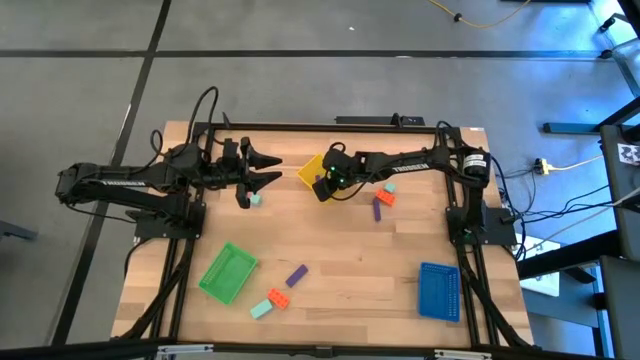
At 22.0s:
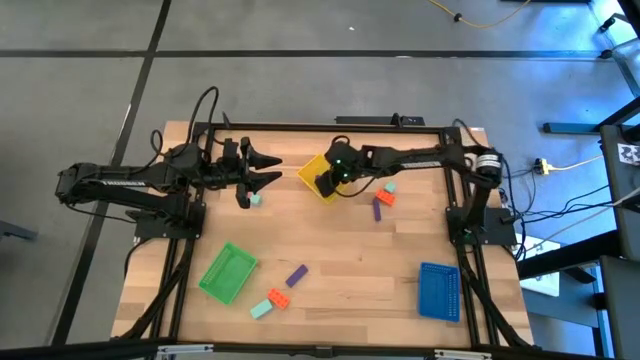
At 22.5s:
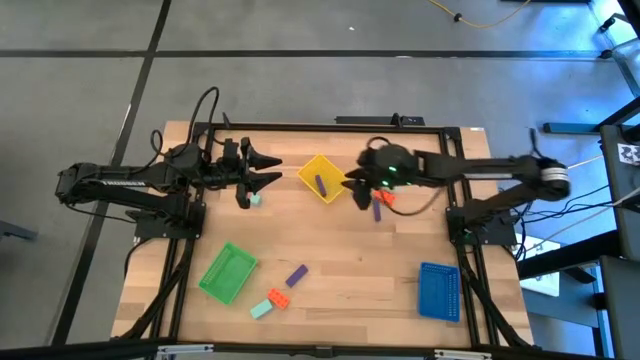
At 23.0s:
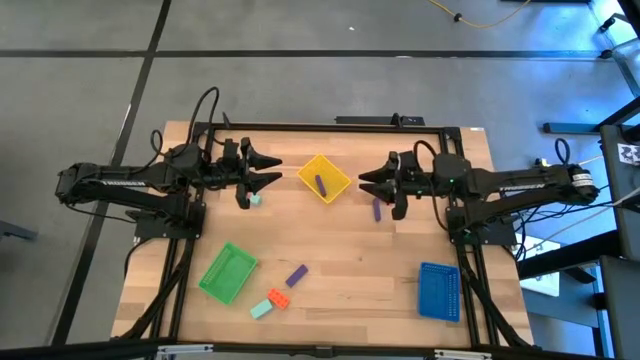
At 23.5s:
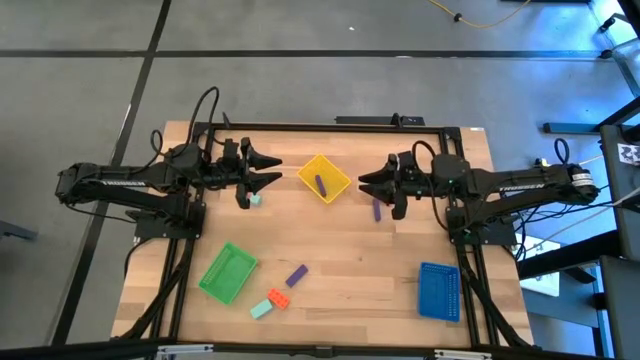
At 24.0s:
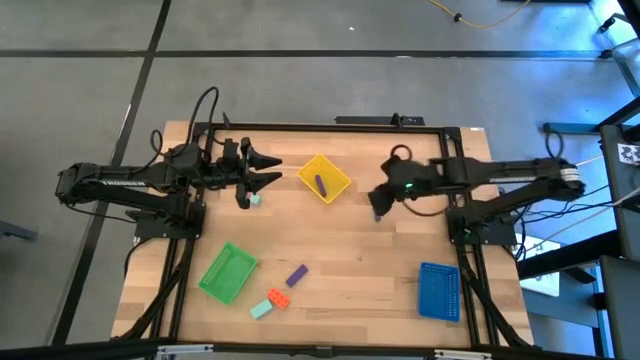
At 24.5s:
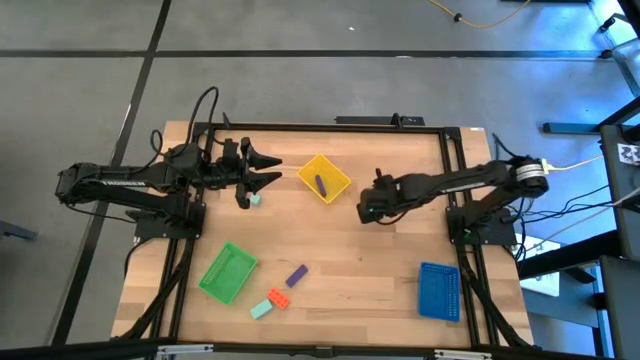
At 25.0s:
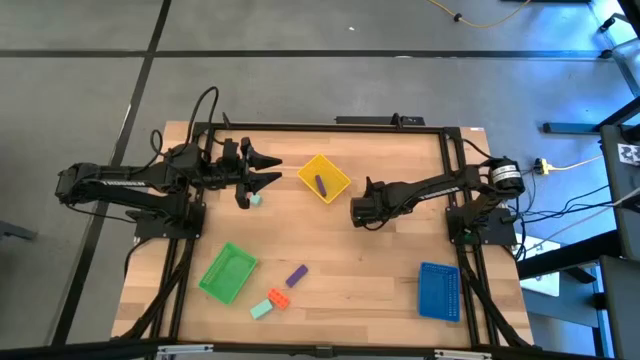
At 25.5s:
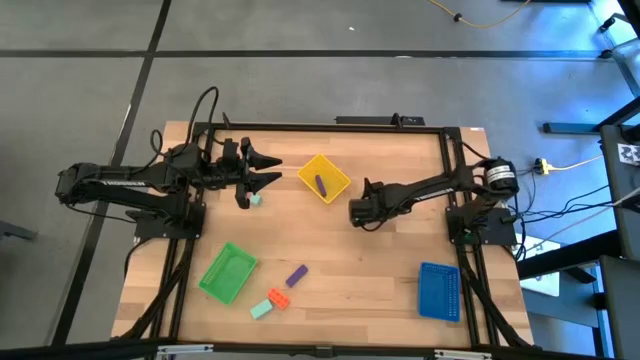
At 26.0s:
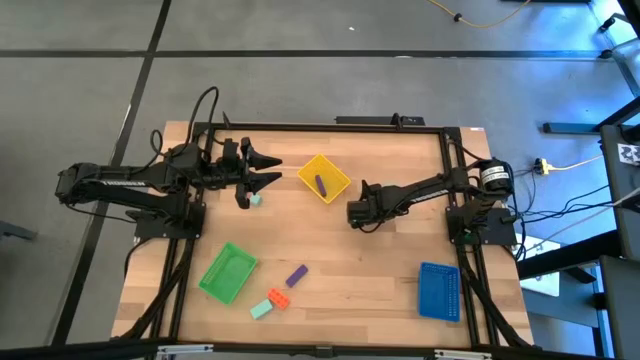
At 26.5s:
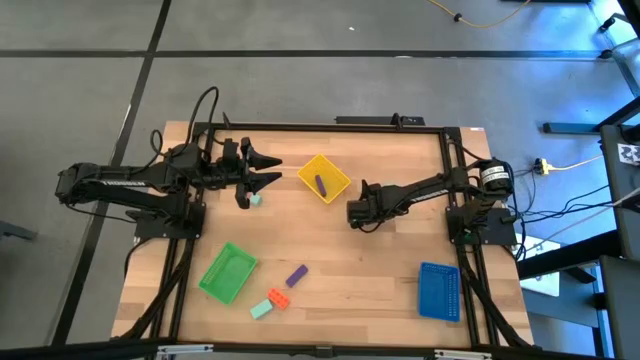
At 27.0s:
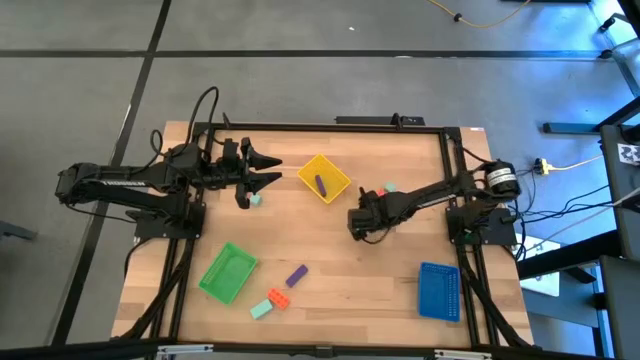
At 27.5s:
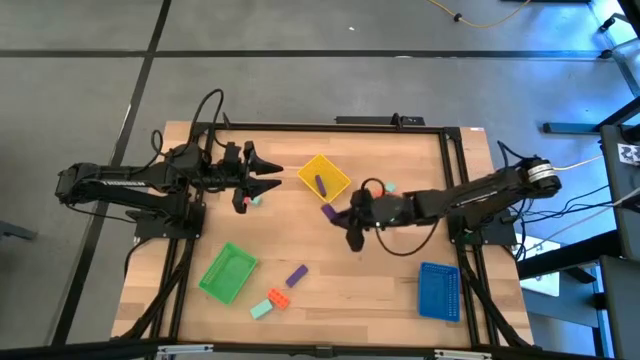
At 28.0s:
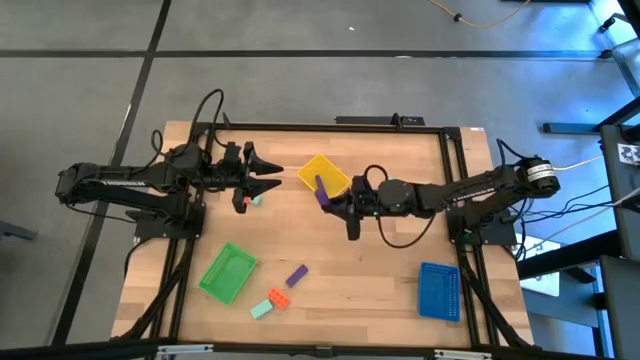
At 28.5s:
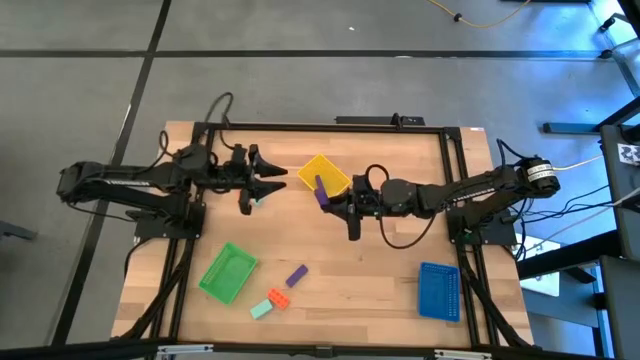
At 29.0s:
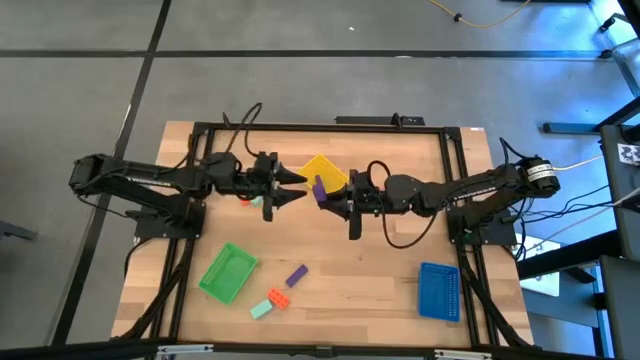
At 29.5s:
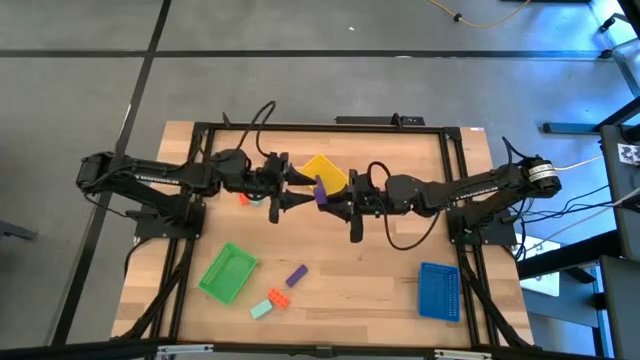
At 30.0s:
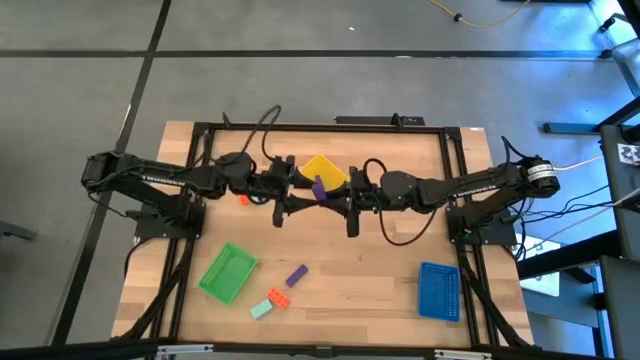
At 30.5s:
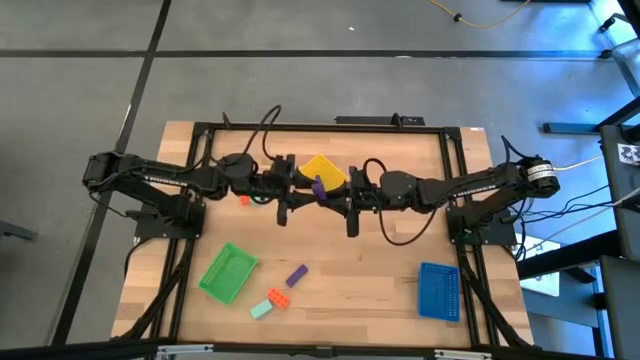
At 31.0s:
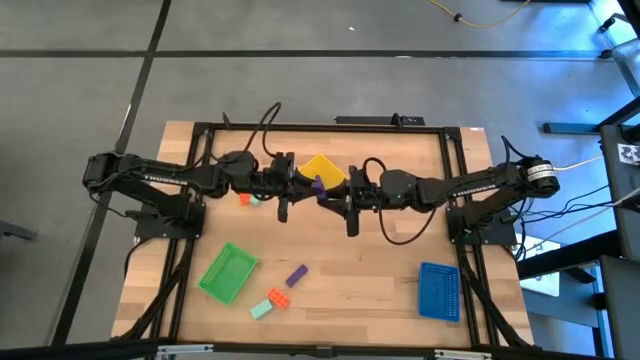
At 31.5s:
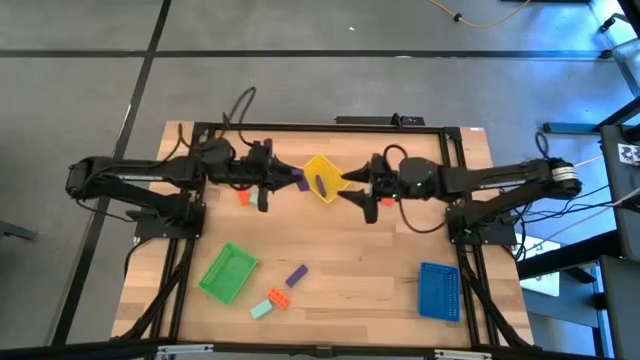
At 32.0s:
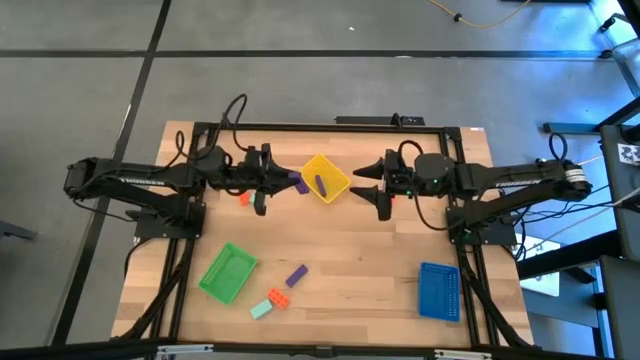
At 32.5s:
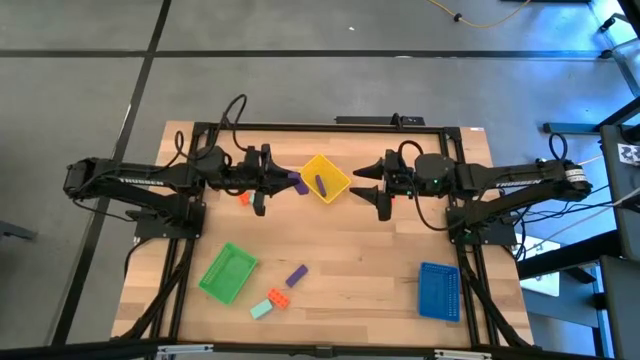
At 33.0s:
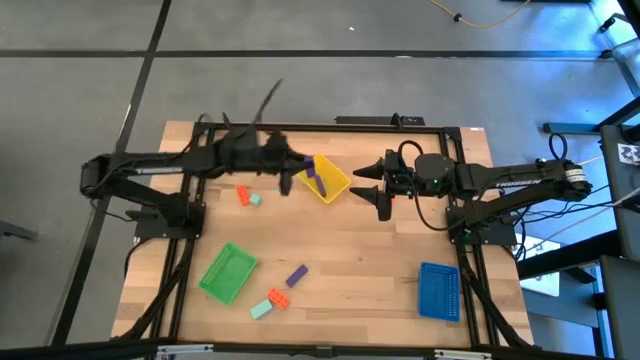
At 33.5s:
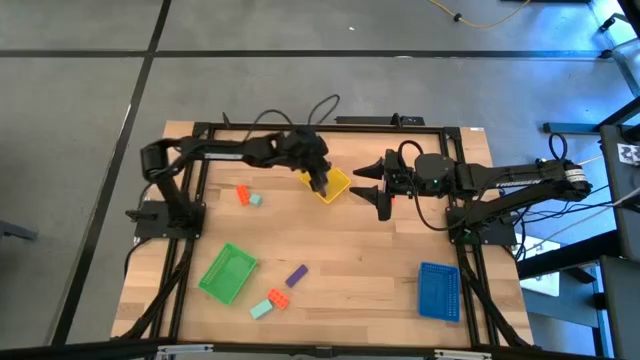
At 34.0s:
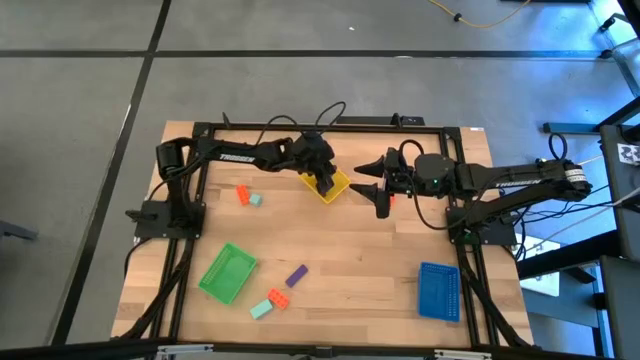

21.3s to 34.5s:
Task: Sort & place blocks by color
Put the top violet block into the yellow bin

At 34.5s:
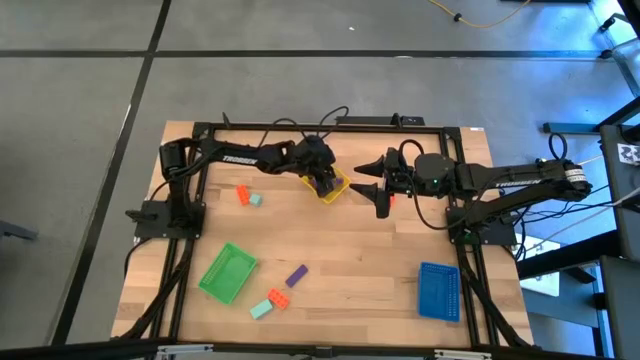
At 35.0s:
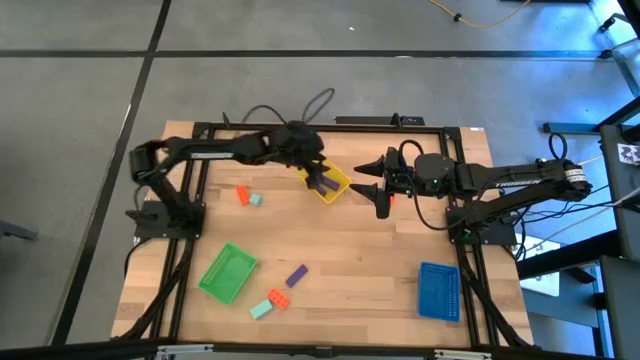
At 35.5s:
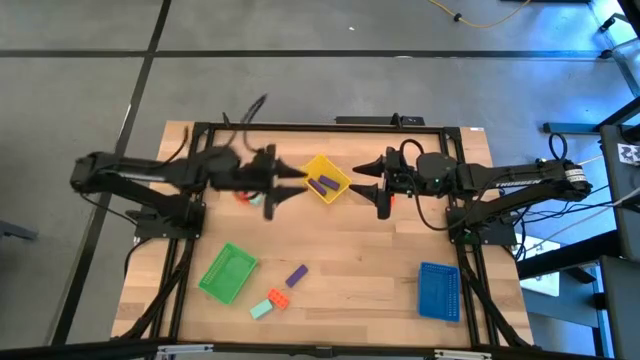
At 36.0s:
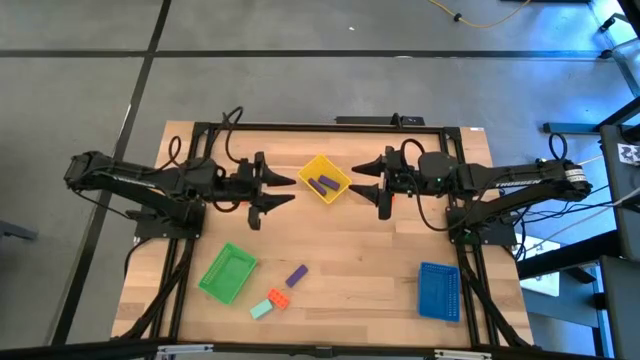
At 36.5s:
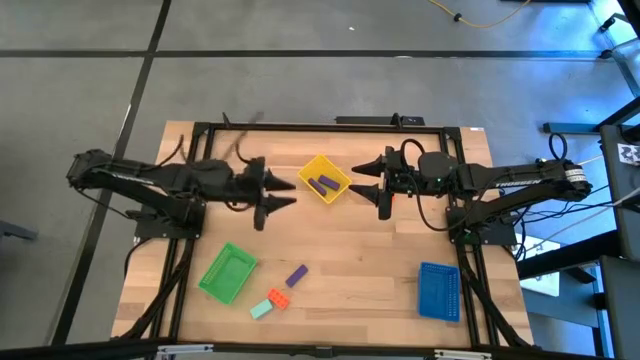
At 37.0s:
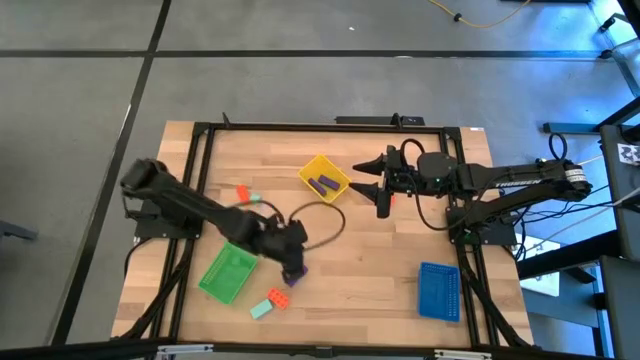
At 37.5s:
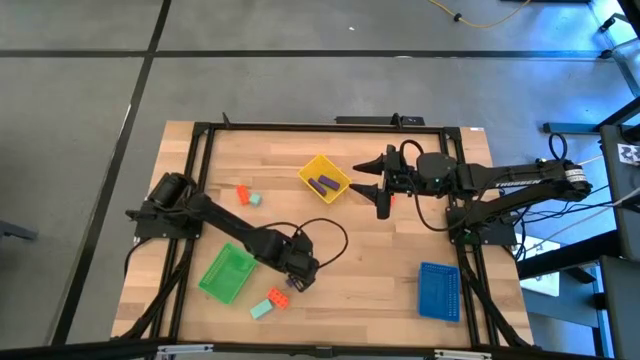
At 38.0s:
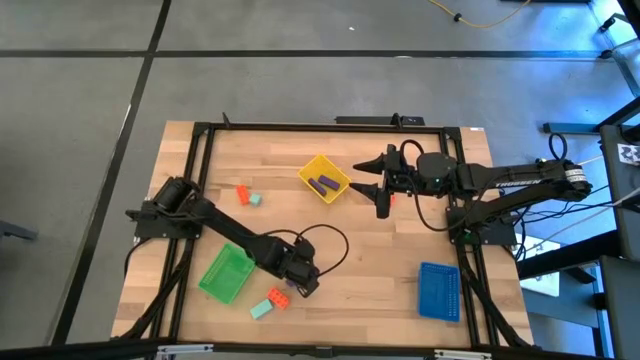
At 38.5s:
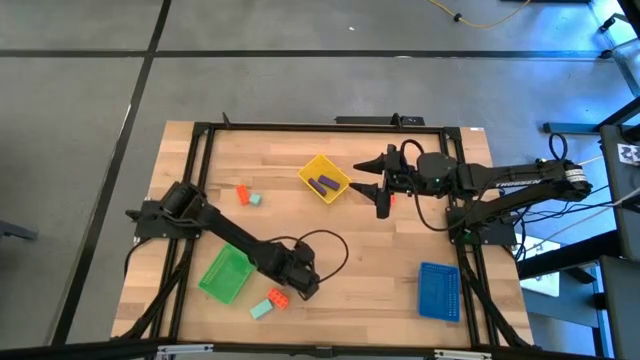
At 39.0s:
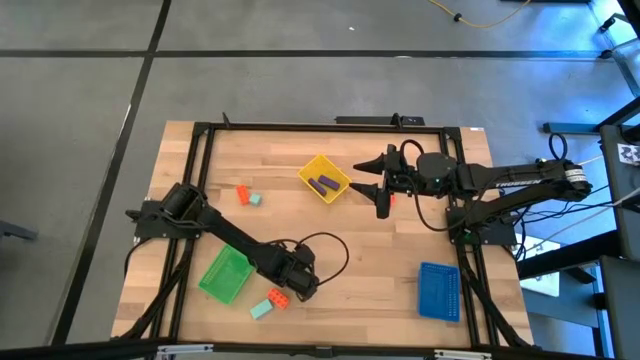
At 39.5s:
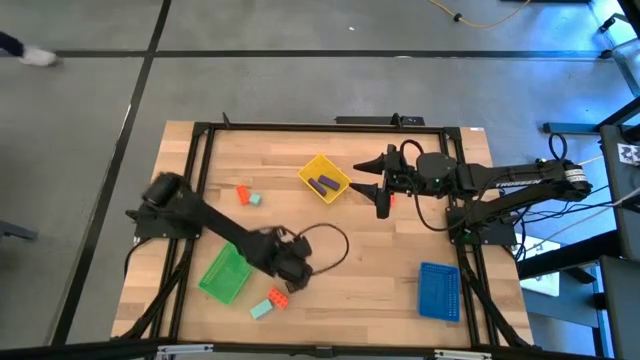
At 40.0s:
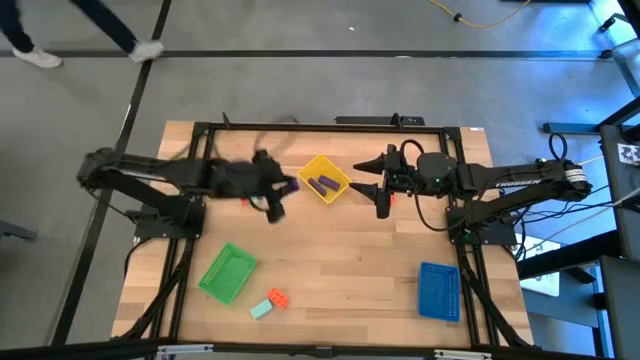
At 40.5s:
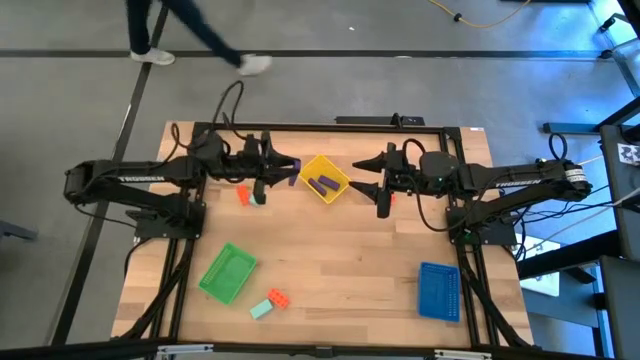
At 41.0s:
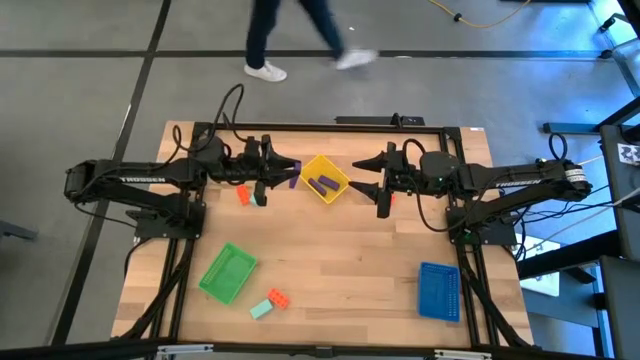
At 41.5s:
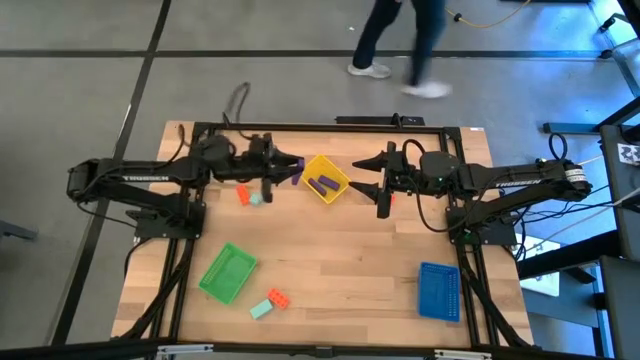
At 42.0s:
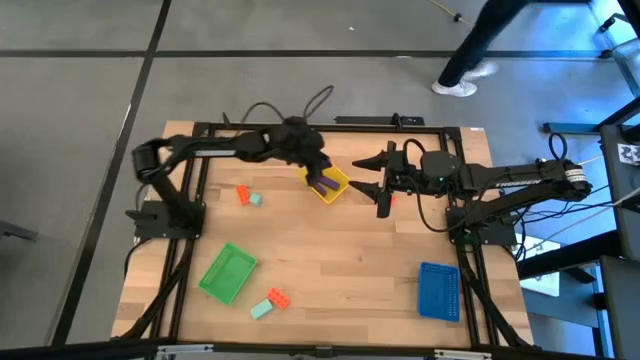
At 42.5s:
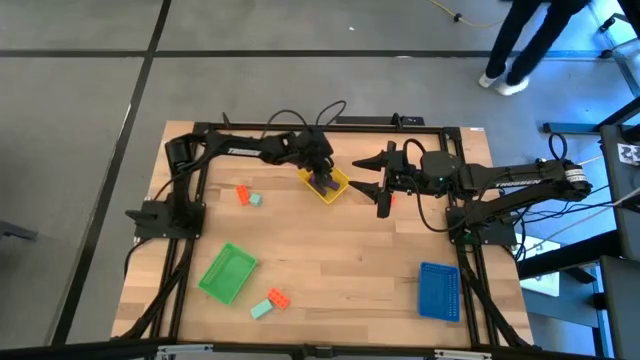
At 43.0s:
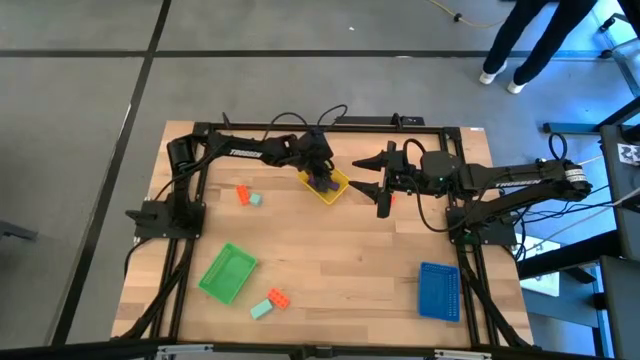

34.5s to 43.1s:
Put the violet block into the yellow bin
